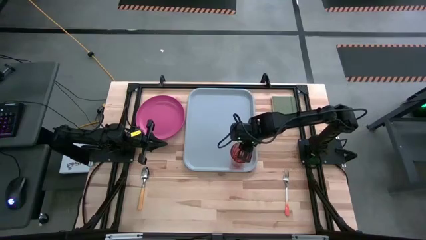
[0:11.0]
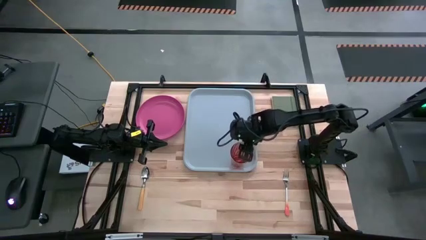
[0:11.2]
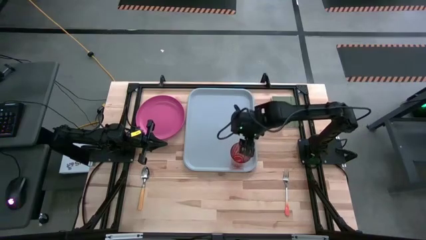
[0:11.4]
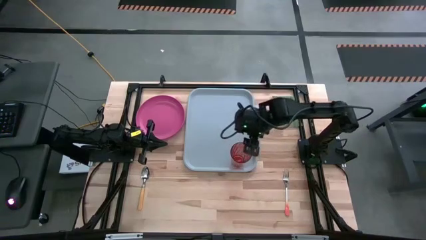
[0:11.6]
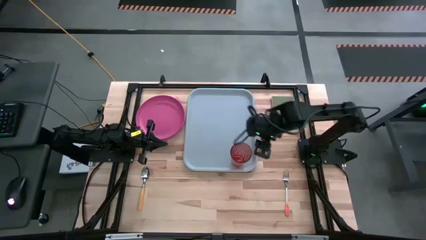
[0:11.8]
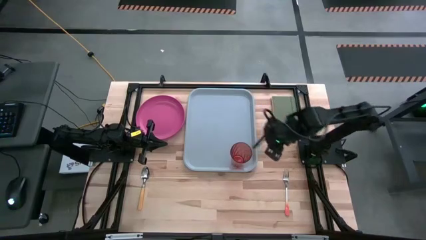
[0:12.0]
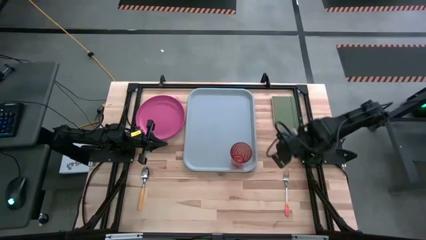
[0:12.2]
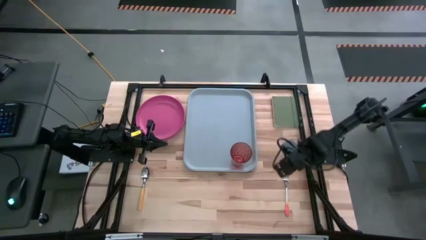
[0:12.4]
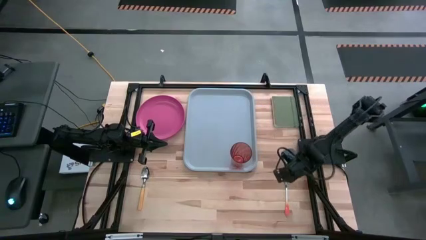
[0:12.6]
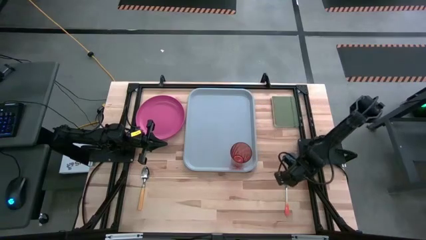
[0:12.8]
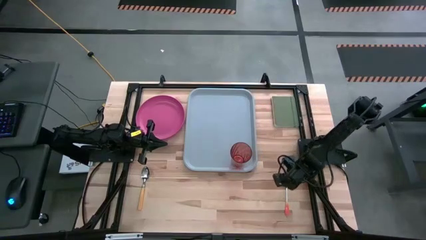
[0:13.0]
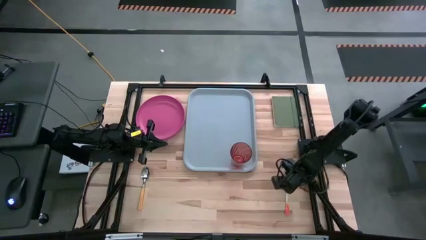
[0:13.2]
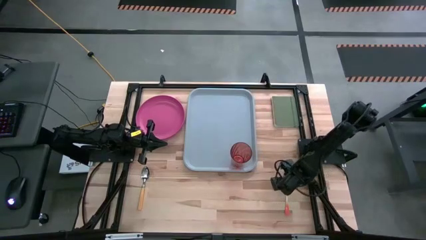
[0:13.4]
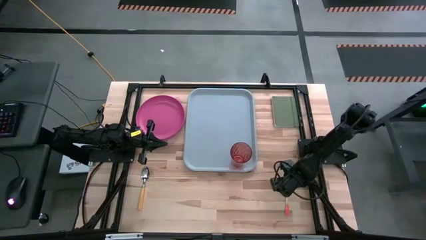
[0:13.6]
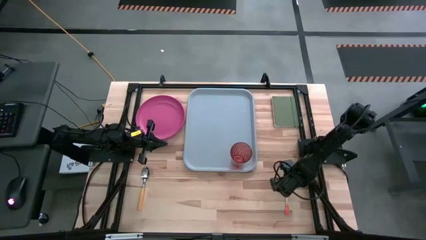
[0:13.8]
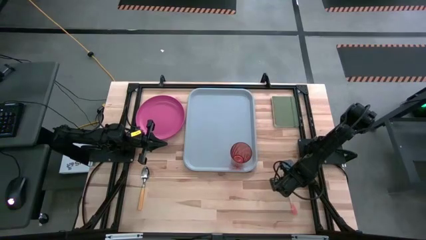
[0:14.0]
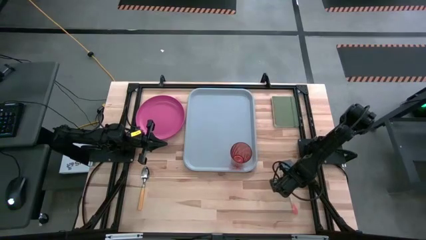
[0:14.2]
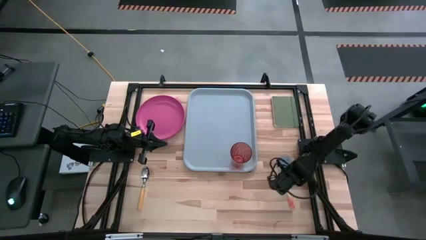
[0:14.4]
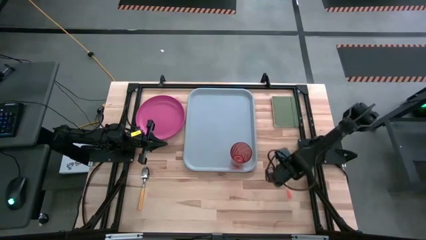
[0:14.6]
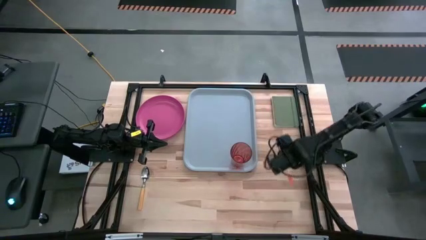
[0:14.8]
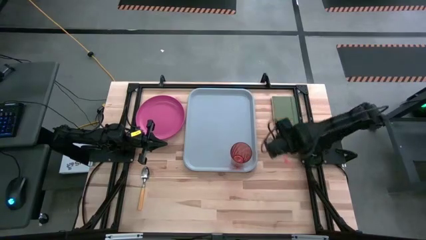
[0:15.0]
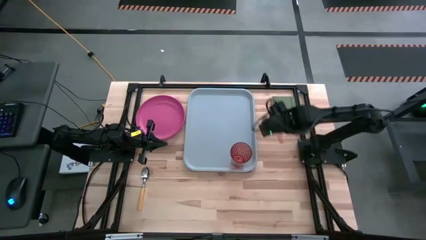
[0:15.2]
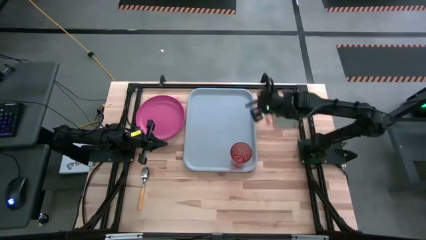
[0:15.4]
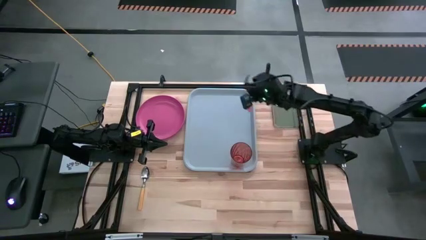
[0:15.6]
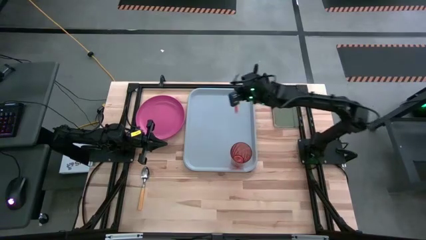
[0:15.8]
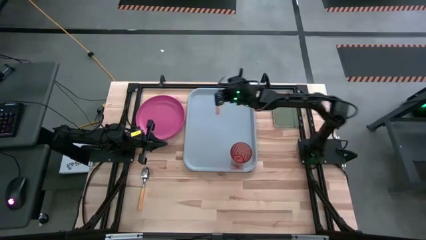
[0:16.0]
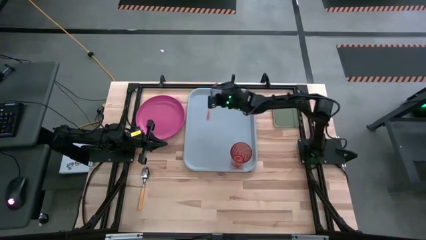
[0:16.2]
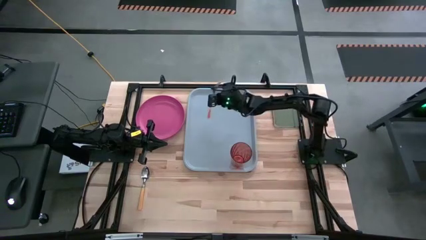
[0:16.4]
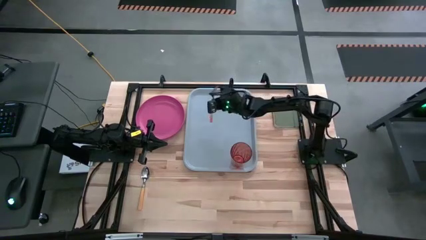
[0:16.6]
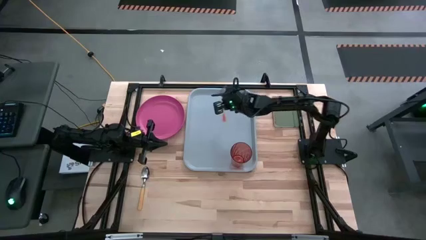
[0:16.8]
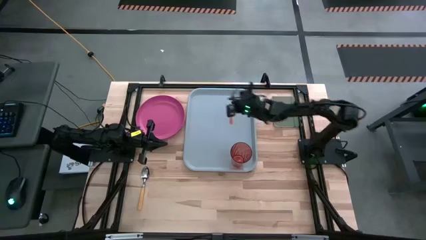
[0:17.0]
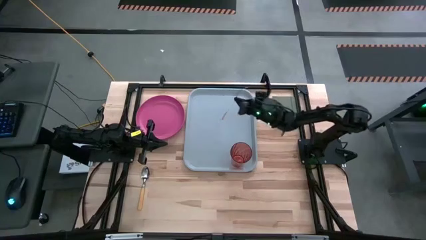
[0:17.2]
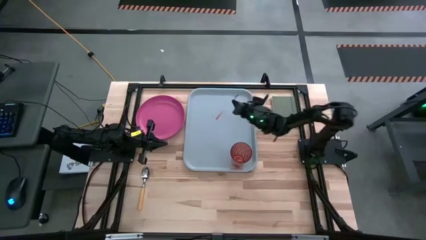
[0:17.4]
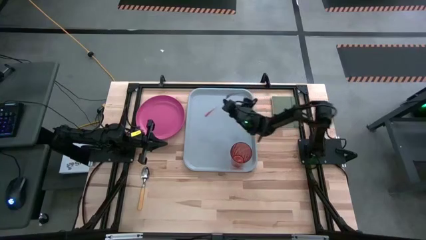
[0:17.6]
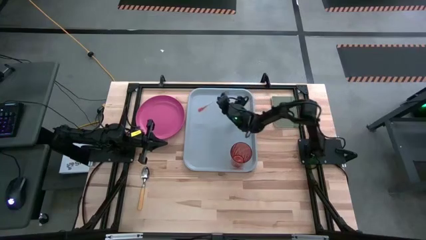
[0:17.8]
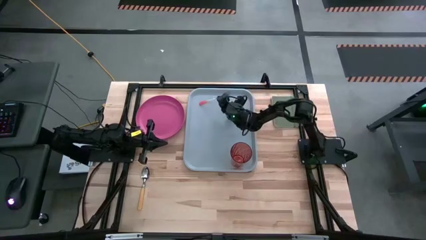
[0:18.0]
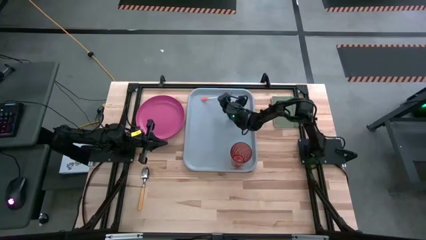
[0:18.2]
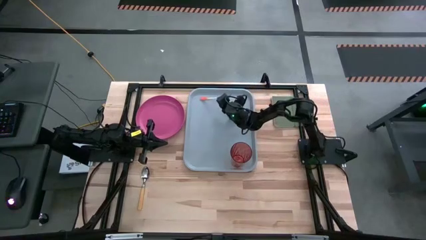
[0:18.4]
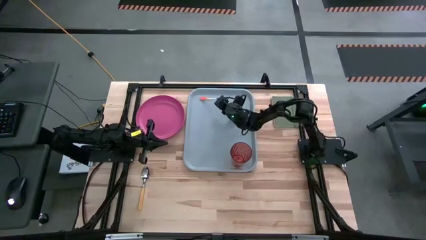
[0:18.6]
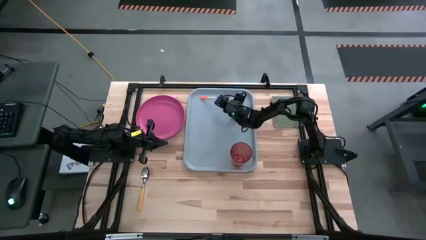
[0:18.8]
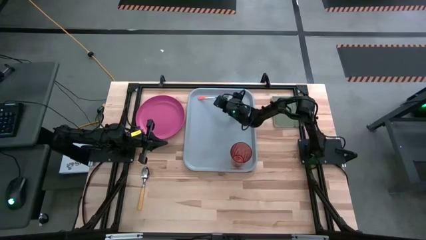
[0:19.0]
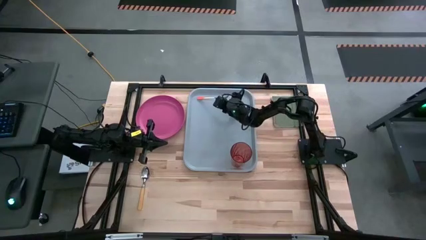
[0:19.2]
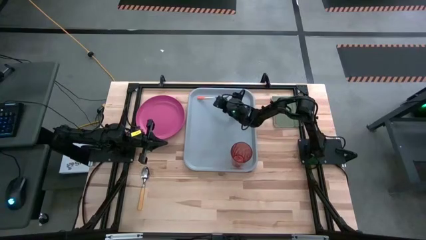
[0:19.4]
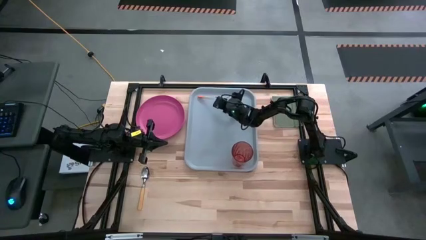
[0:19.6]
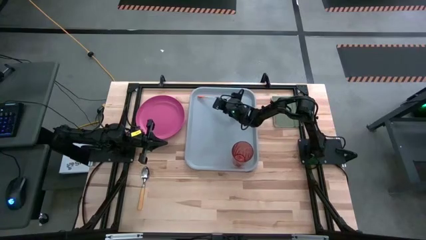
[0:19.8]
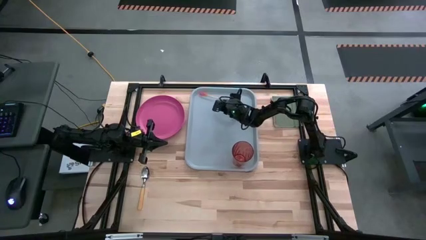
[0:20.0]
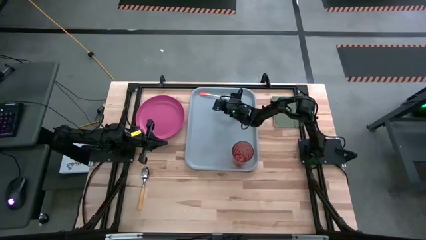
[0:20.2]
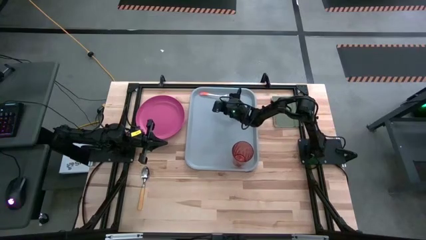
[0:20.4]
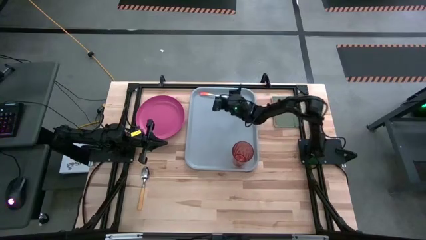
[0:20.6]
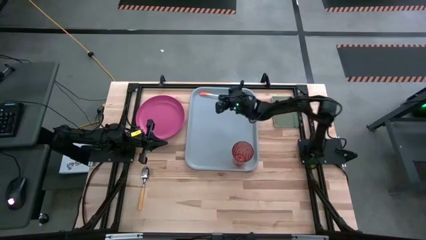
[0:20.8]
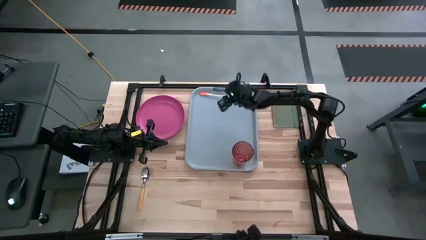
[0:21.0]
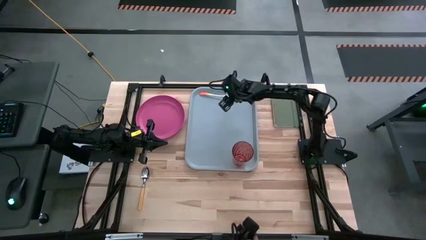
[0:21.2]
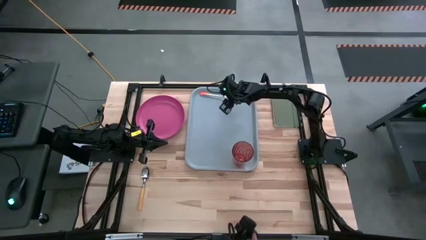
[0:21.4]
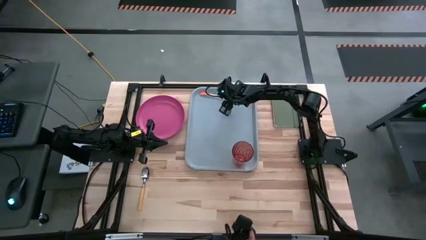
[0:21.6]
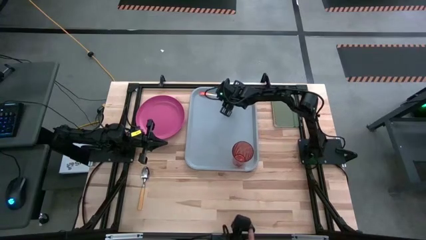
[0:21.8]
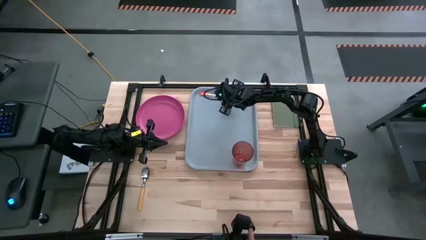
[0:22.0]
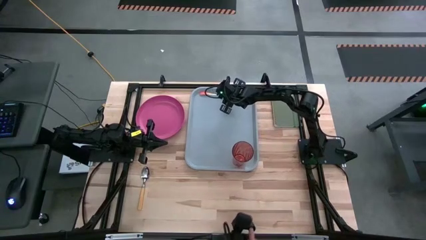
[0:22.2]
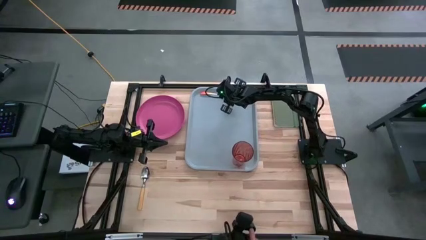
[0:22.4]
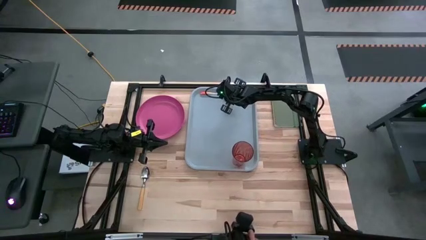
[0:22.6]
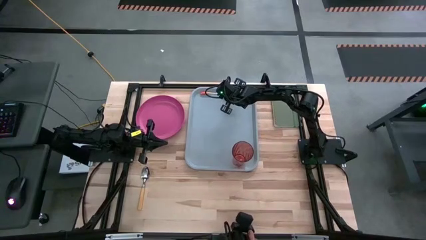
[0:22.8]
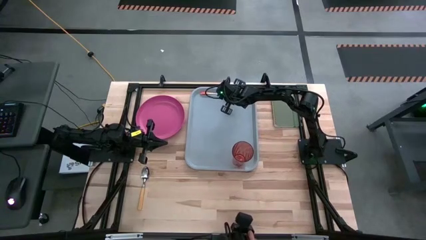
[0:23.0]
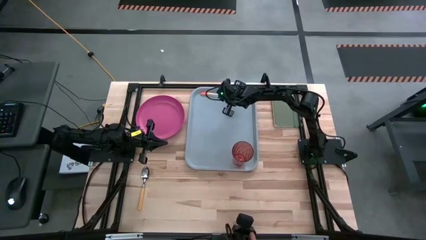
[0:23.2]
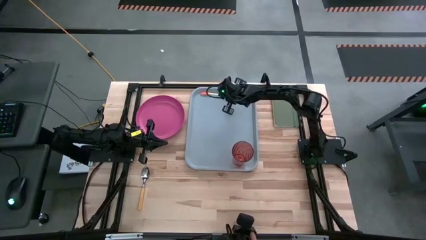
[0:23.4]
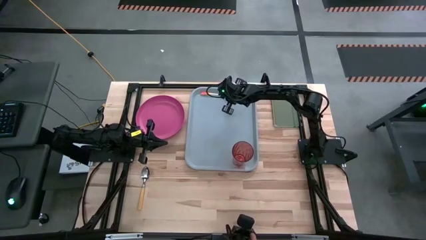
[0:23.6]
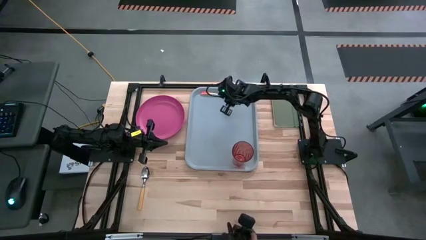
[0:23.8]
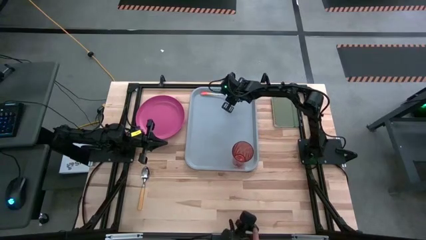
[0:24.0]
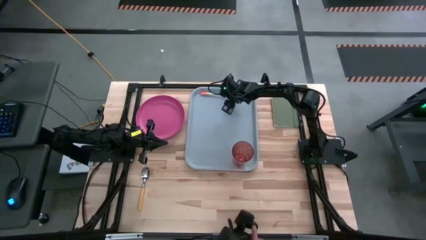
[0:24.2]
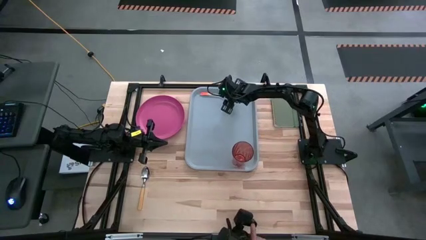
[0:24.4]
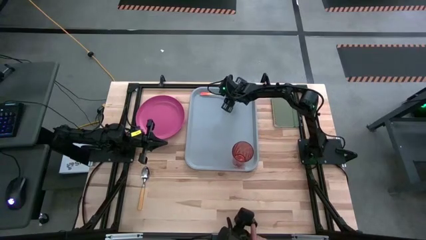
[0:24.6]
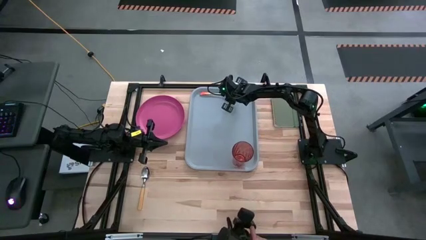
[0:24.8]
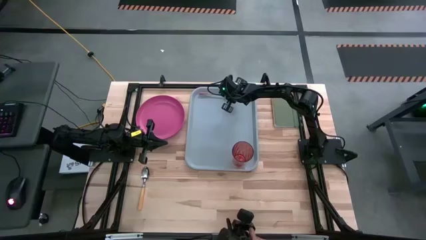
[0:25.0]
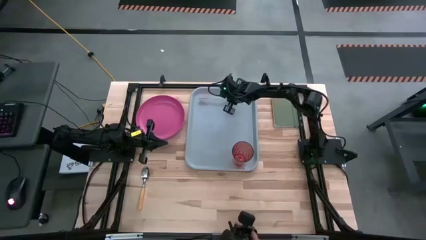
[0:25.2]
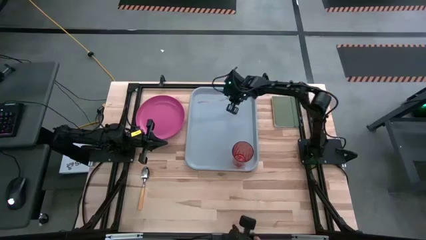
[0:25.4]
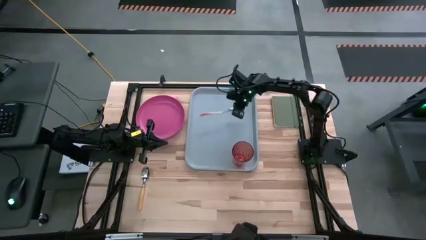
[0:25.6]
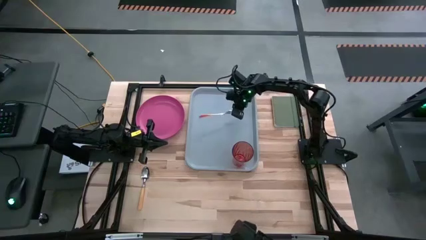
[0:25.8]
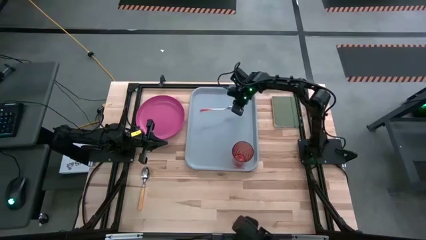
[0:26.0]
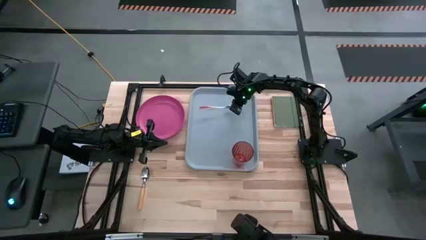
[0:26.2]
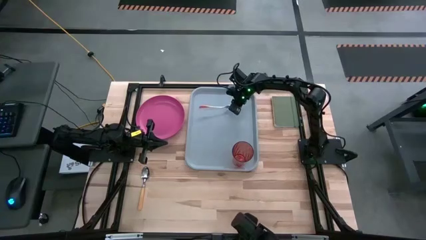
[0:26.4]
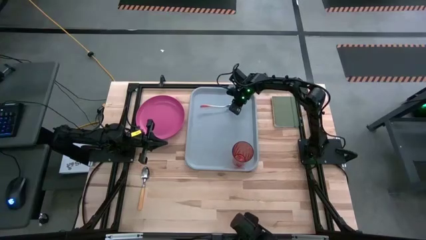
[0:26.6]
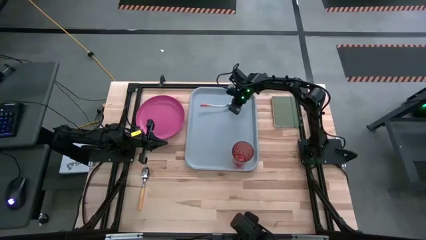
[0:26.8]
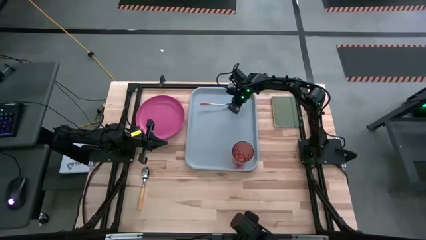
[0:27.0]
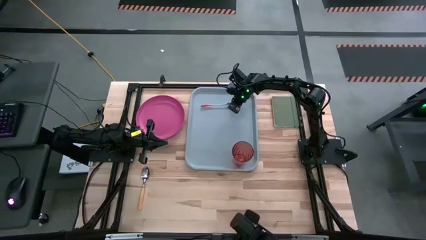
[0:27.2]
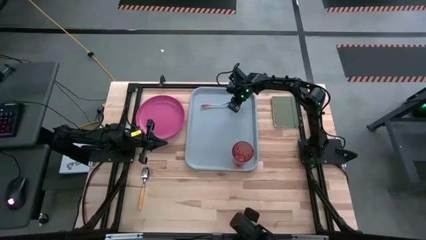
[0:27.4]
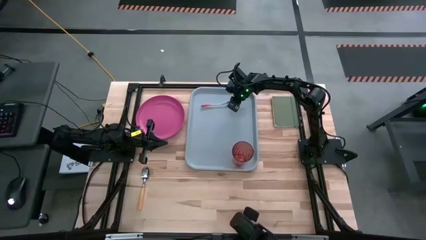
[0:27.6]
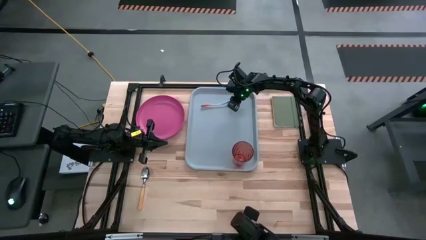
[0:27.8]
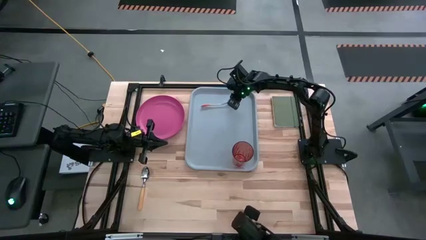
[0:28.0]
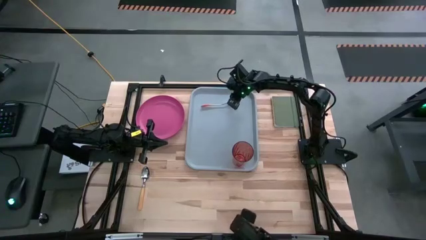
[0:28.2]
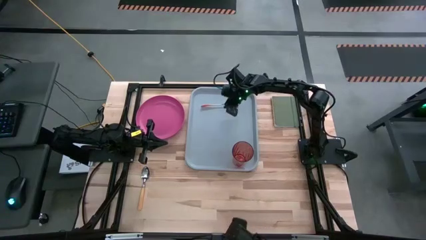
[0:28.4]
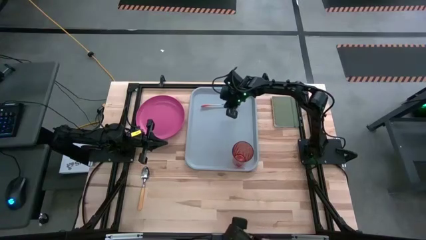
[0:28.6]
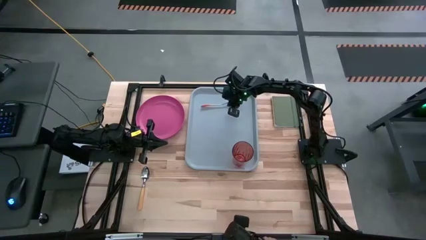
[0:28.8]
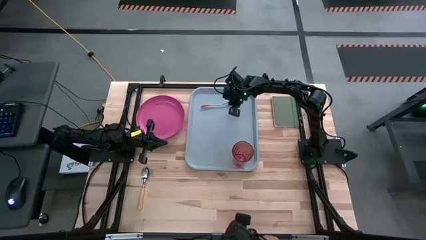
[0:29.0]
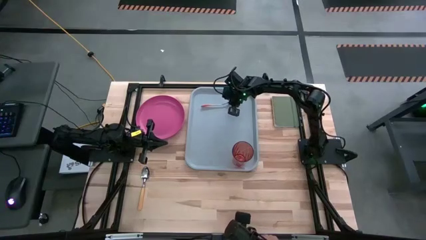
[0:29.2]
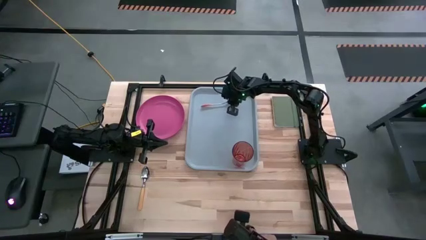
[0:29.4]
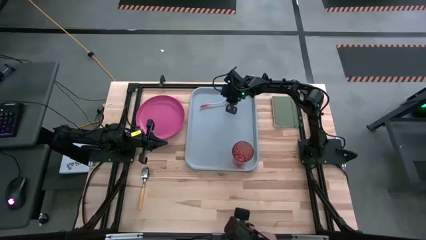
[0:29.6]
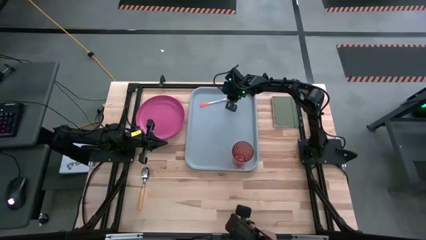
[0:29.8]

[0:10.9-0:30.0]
Task: Pick and place plate/cup/fork/spoon on tray
Put the orange fork on the gray serving tray to the top left of the orange glass
